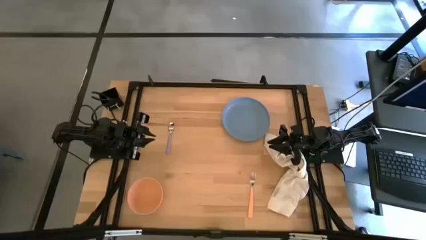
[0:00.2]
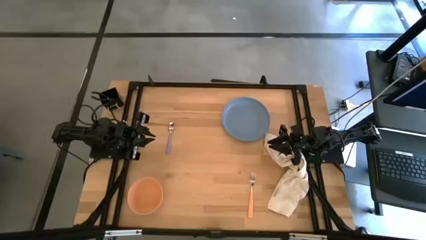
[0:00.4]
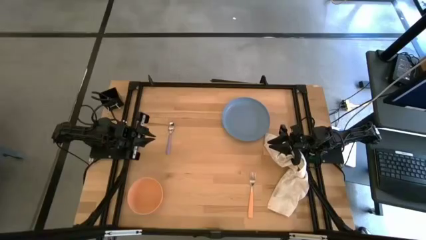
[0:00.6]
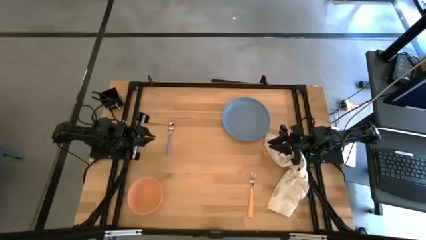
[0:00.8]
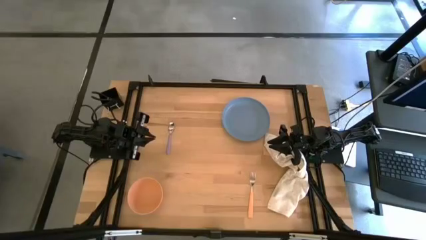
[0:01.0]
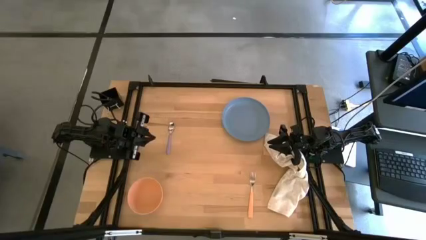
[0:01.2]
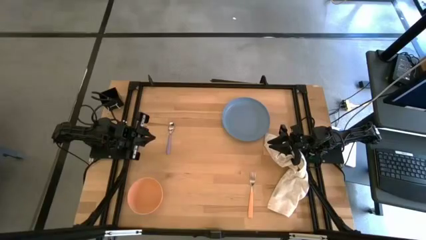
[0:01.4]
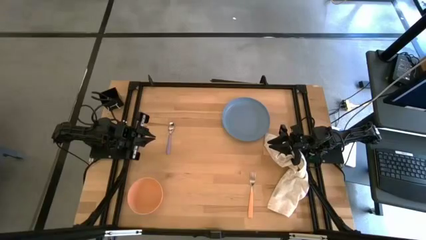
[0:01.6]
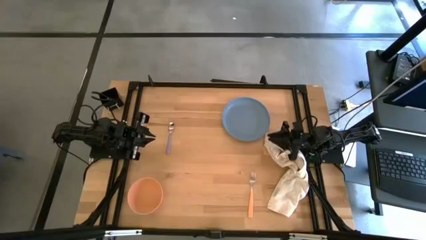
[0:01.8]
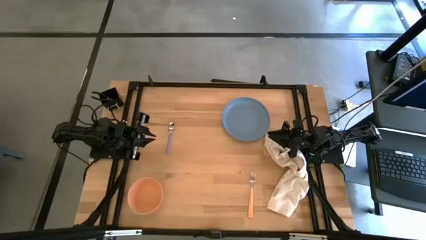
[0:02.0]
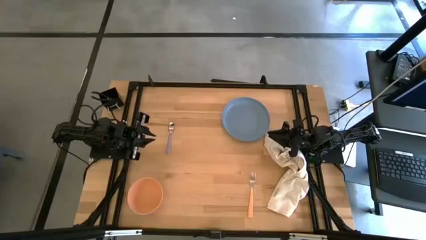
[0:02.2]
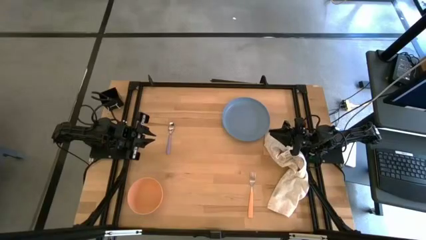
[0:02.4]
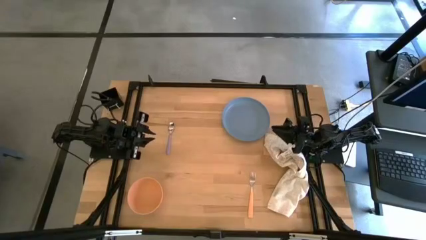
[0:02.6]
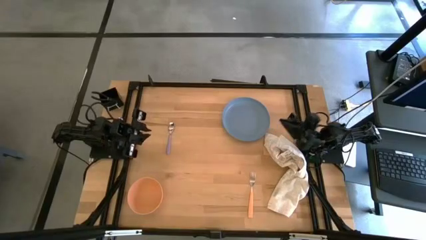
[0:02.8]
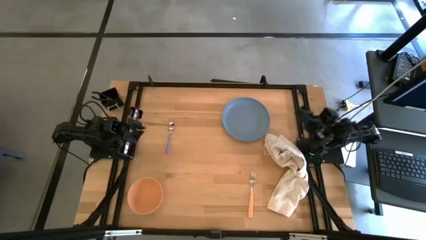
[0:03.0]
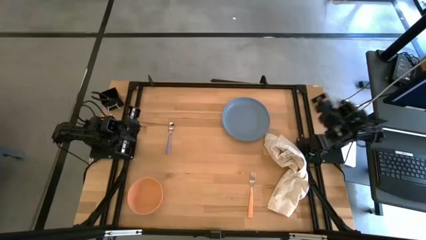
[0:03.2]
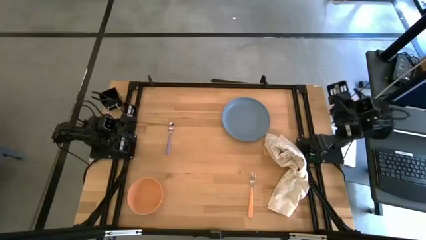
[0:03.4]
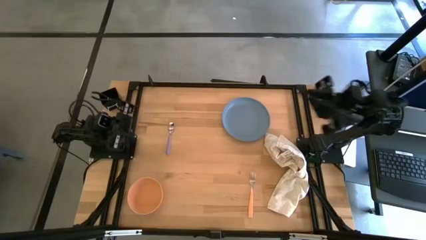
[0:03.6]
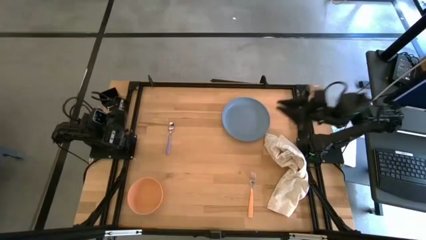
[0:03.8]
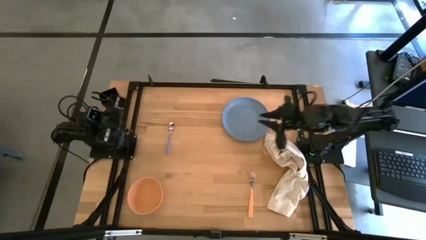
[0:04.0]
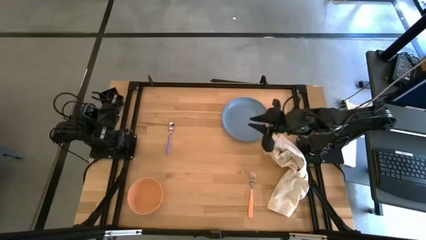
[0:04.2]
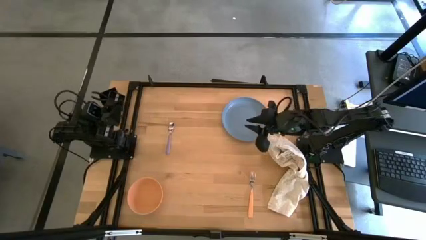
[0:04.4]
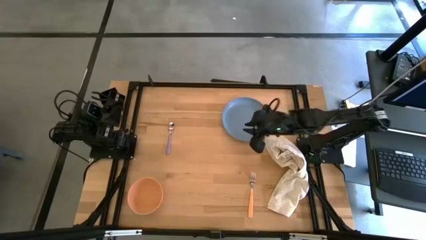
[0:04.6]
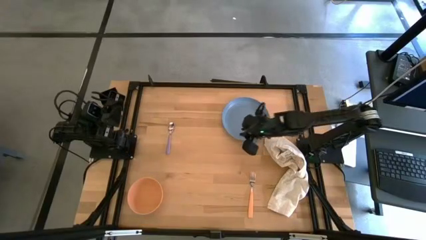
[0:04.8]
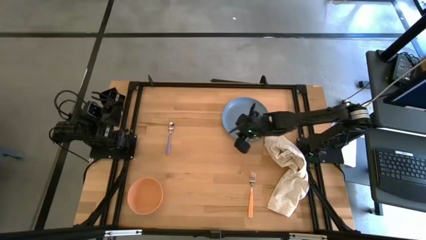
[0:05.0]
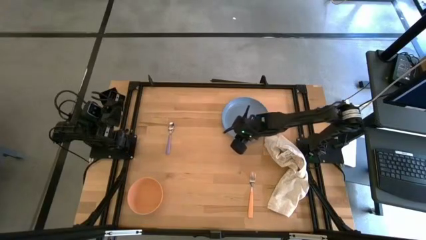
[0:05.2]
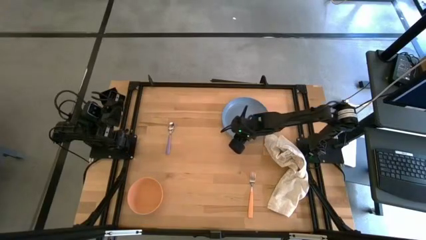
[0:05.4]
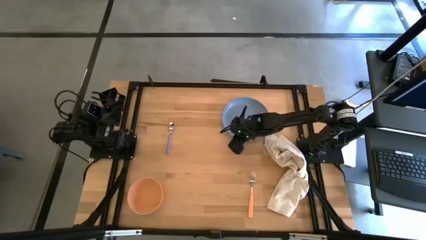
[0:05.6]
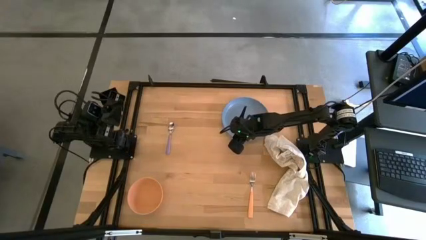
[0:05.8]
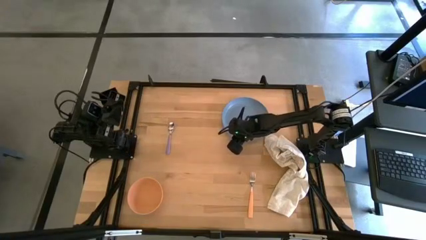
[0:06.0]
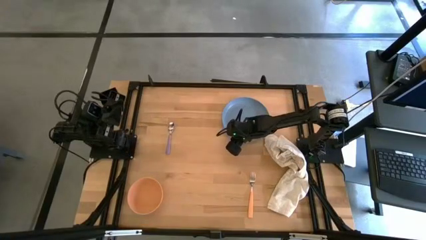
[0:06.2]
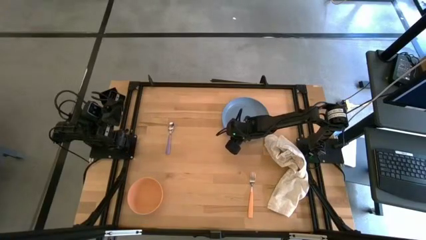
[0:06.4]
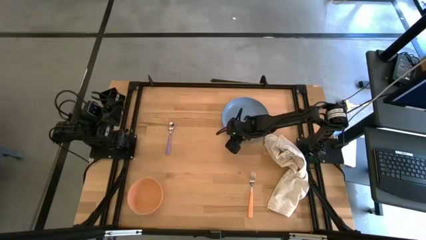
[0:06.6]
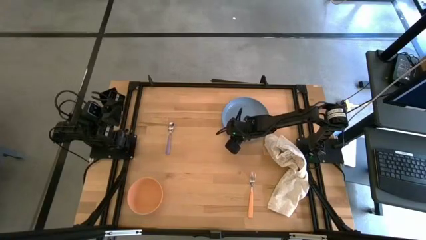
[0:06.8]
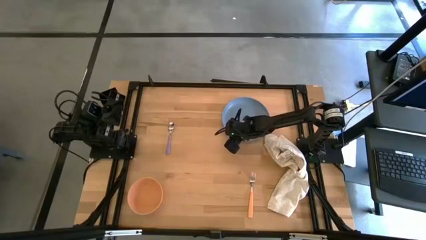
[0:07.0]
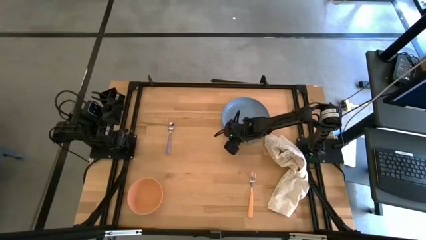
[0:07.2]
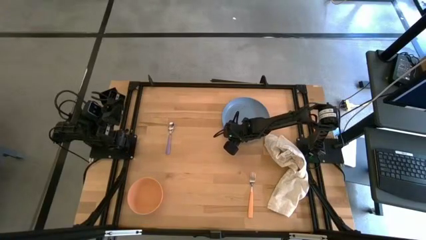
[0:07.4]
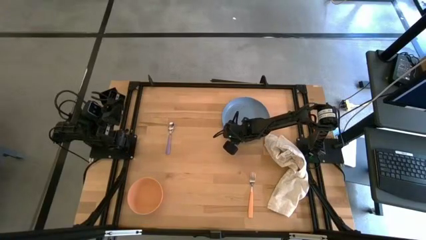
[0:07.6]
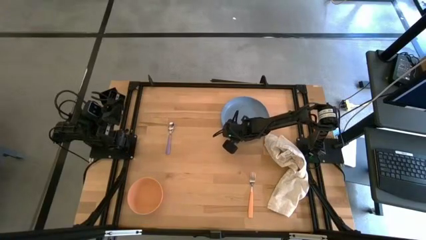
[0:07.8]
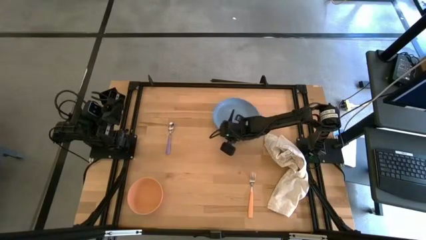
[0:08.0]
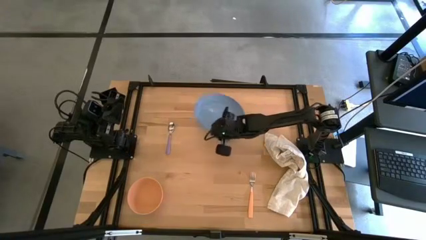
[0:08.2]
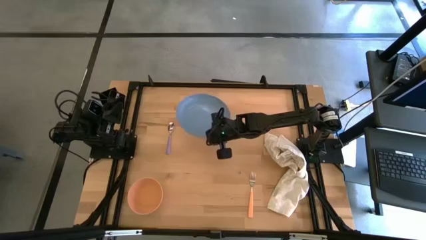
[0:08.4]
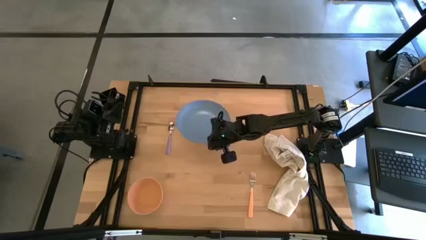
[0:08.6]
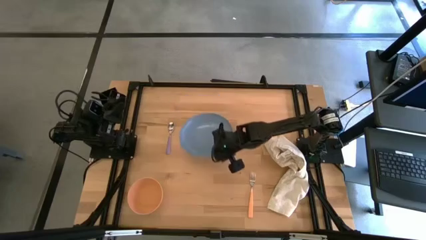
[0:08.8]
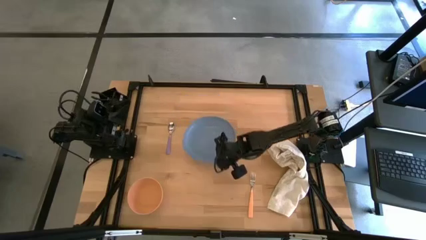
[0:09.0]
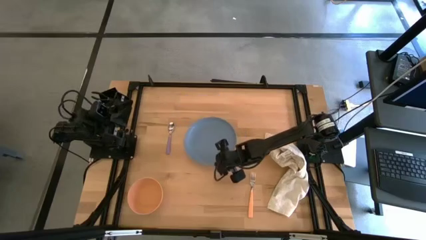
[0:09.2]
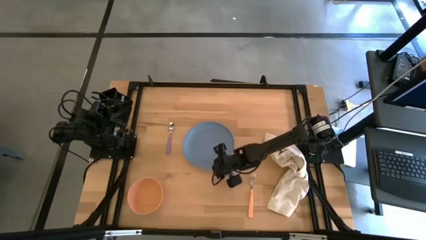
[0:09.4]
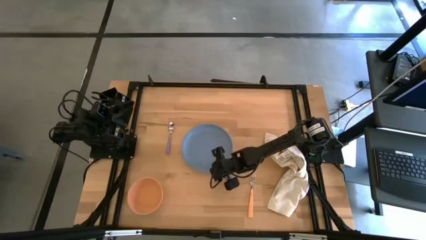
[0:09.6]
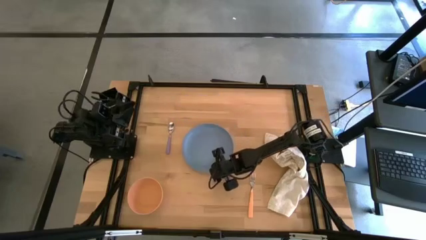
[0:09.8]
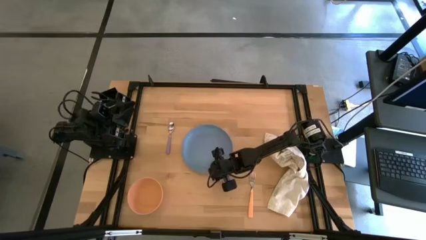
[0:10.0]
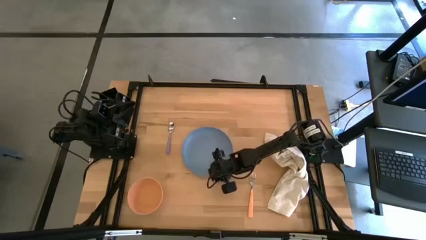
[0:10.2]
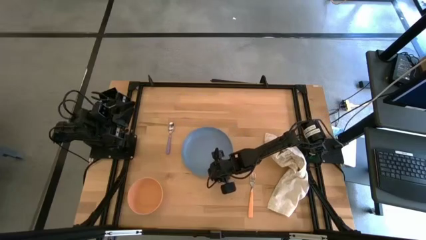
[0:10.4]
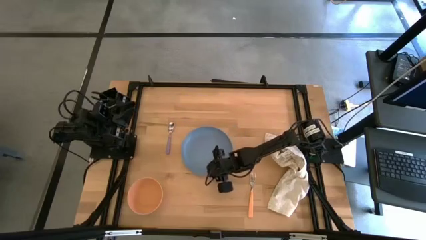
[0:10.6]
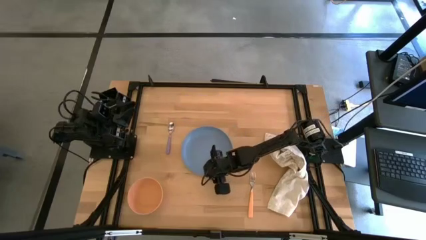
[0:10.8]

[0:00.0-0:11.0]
Task: Set table place
Place the blue plate in the center of the table
